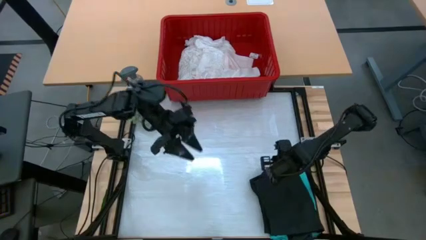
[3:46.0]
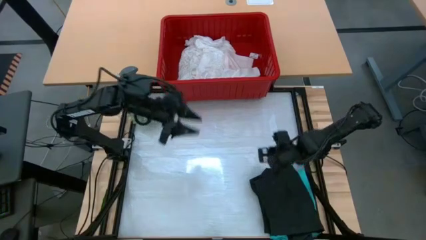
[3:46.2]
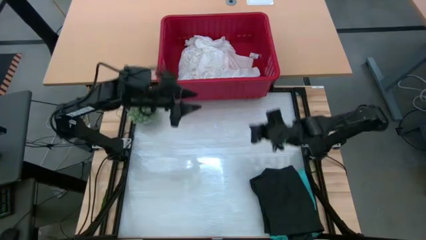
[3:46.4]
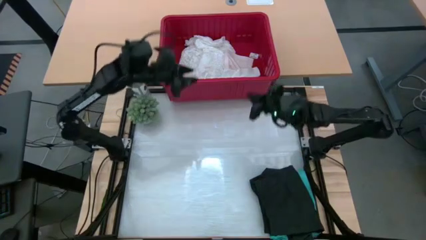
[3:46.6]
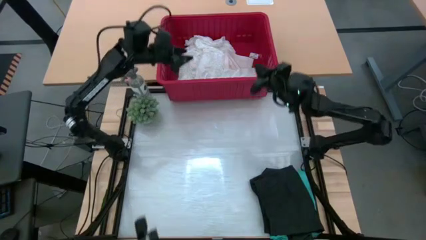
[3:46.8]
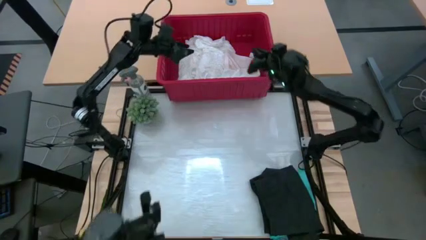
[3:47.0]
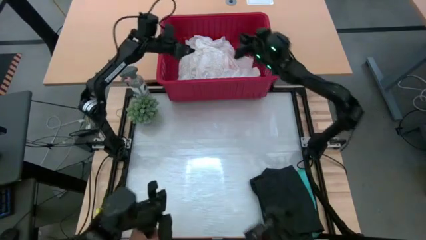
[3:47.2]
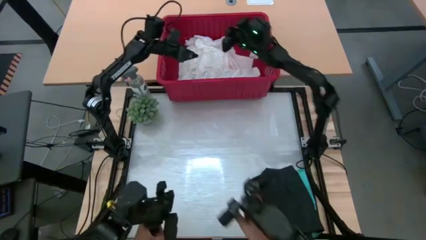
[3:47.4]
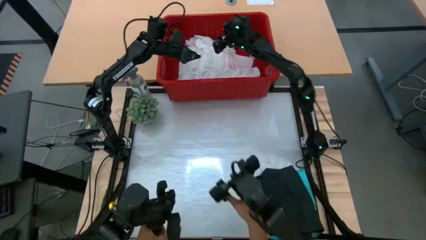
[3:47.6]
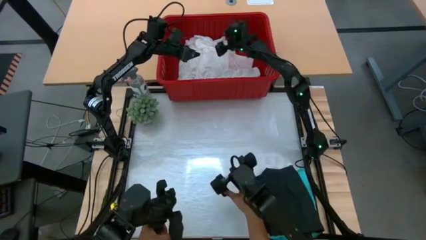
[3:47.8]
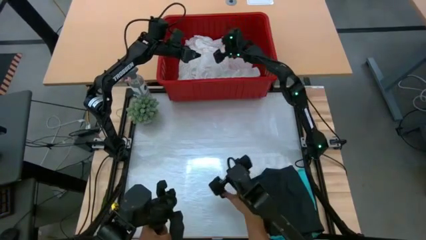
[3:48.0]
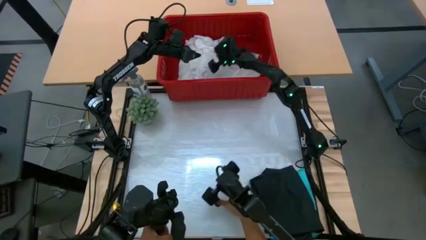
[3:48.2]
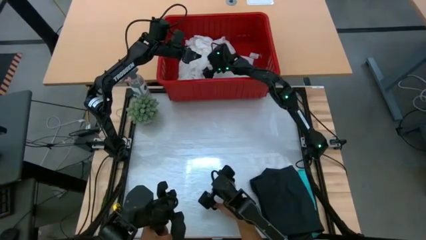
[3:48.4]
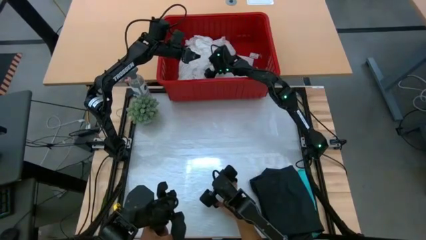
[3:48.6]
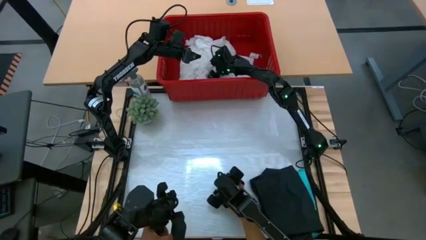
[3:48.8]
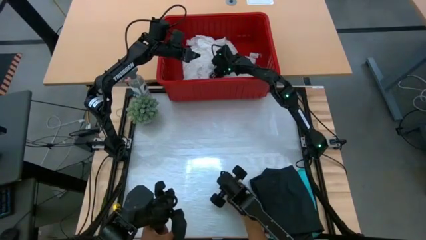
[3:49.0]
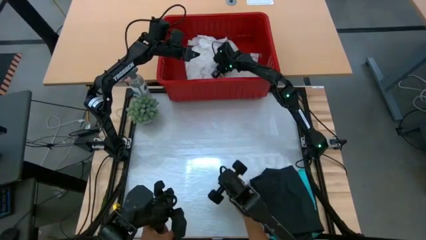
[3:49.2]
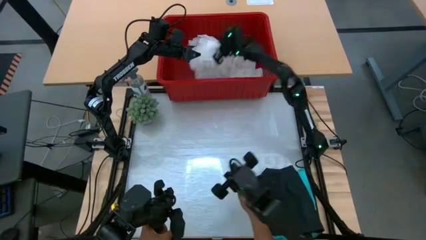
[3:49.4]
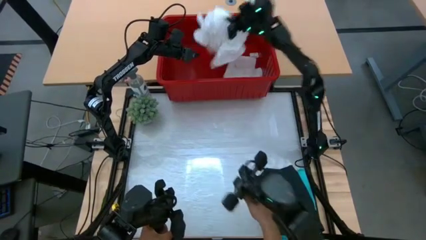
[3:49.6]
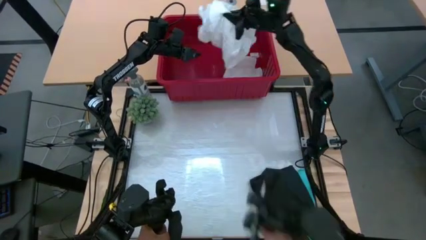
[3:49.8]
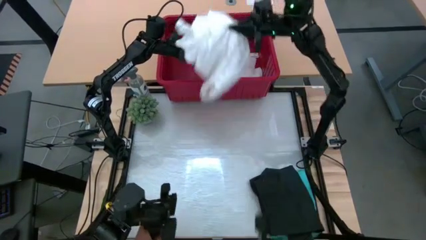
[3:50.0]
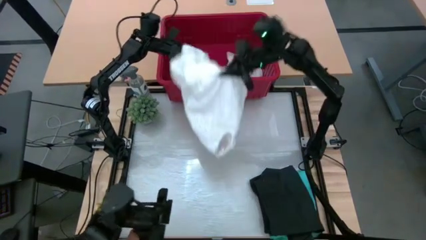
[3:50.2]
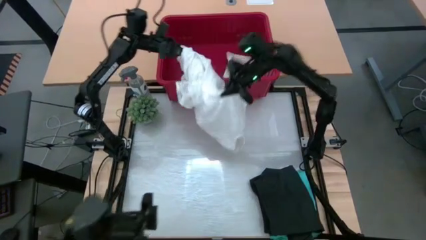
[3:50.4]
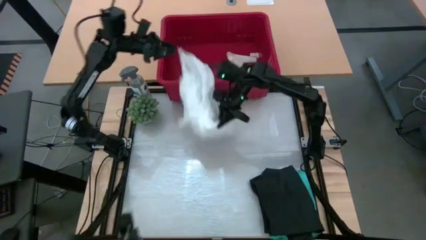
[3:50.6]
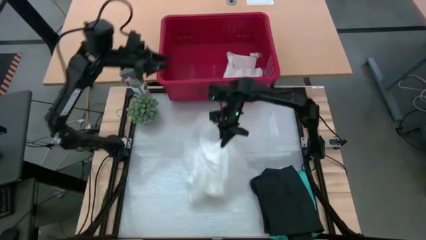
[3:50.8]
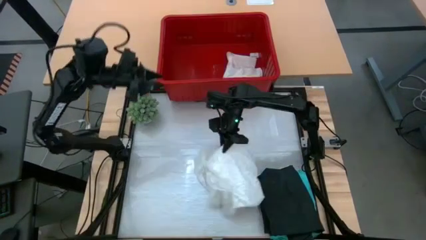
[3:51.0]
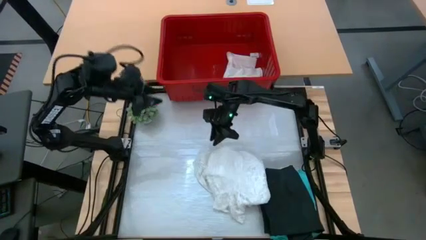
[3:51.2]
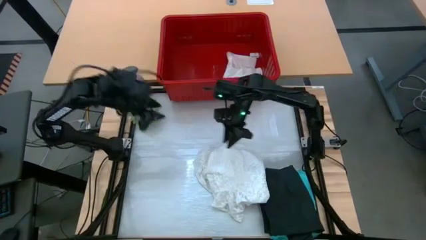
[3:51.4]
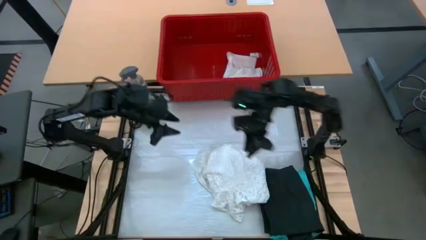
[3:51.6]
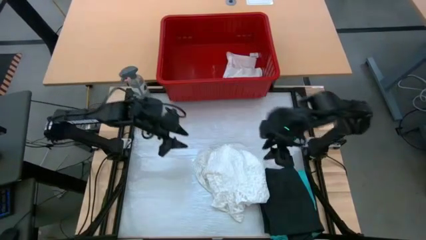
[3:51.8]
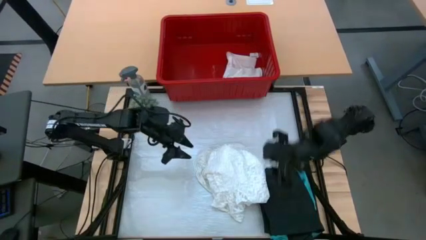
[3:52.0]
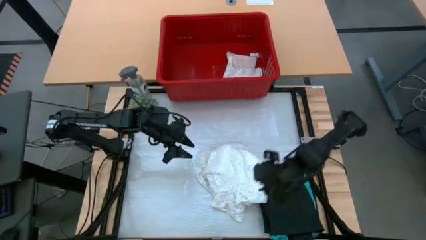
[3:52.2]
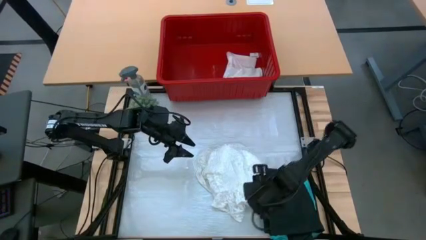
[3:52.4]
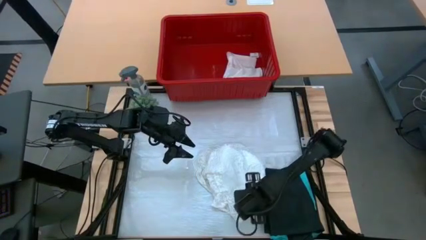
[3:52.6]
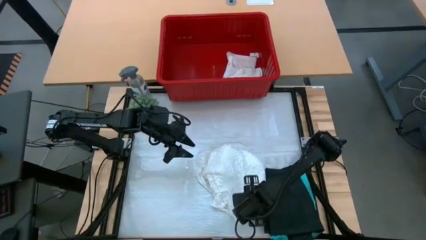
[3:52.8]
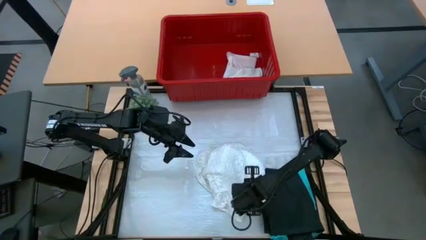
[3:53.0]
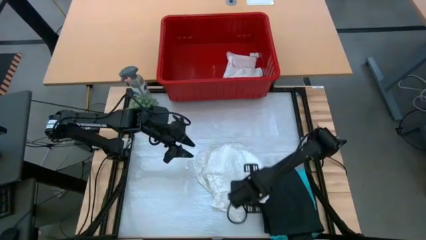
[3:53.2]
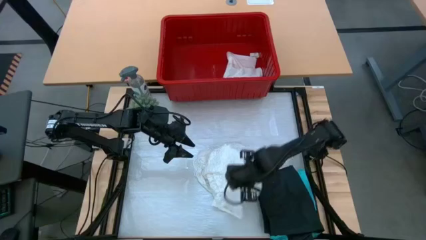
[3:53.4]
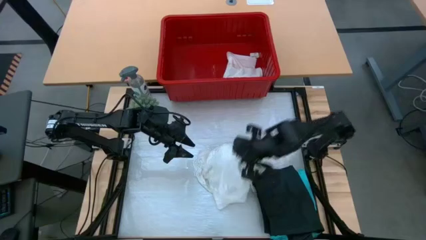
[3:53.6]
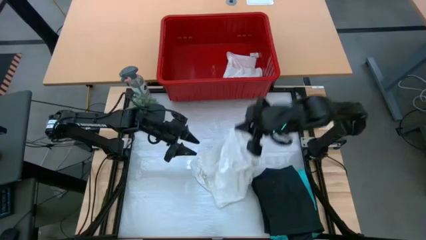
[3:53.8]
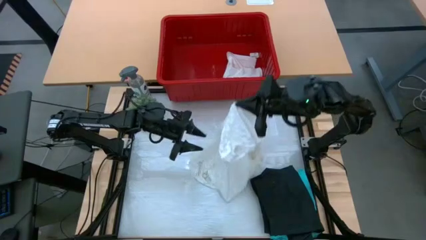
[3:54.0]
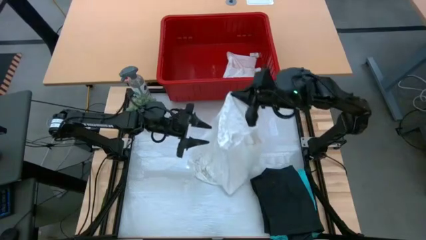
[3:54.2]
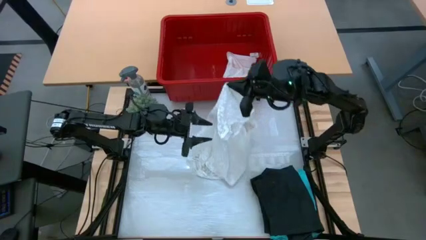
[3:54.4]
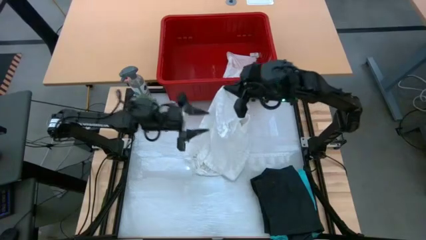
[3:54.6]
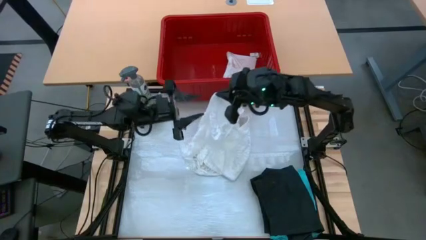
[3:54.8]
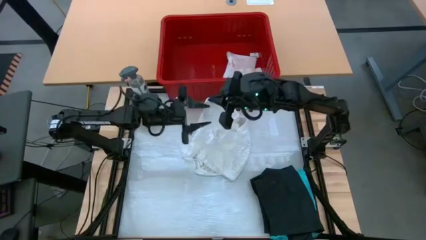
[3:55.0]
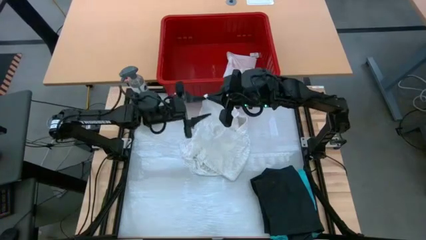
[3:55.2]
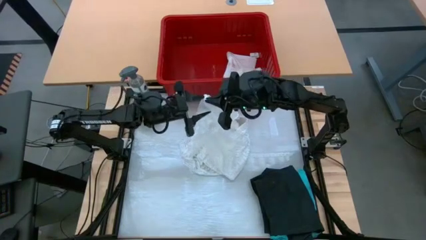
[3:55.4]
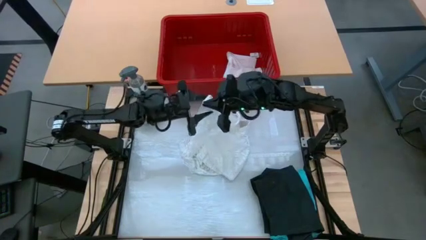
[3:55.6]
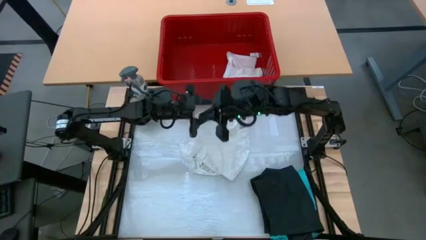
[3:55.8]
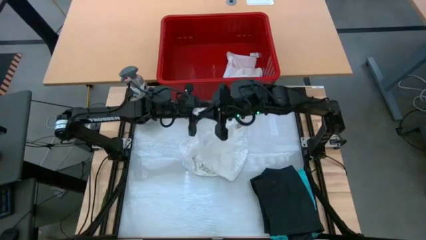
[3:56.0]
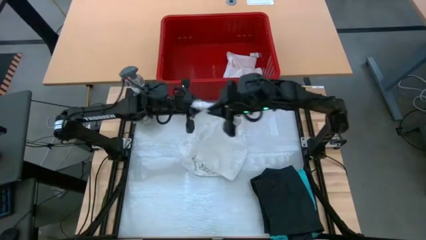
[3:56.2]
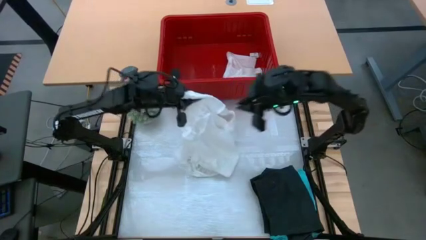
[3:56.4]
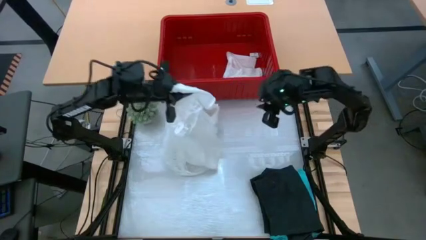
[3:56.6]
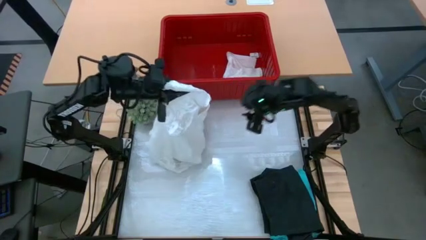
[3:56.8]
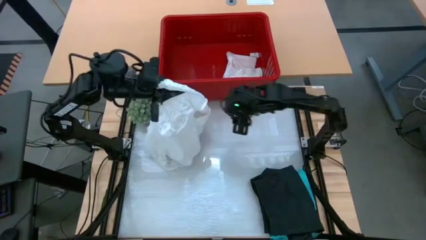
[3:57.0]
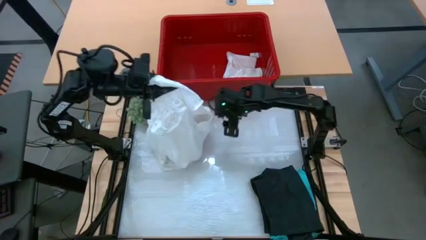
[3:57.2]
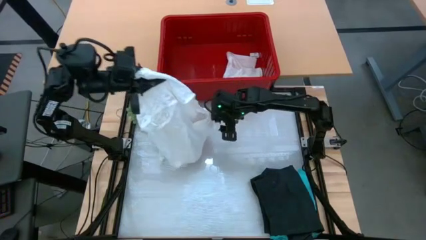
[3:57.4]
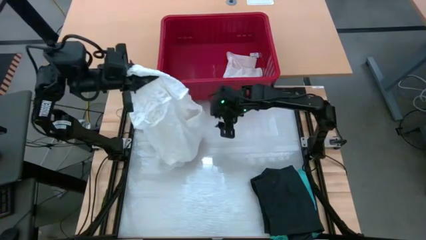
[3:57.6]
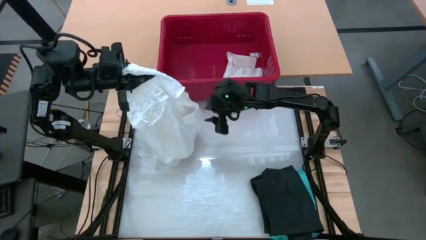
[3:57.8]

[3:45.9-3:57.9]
Task: Fold Laundry from Bin
Fold the white t-shirt

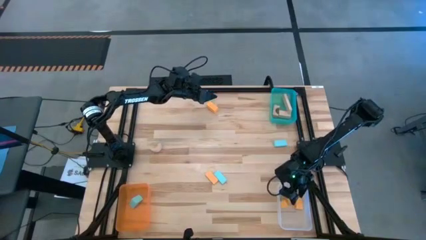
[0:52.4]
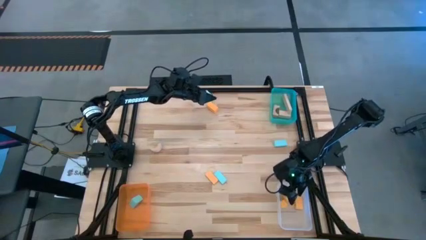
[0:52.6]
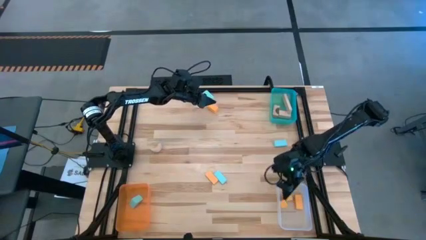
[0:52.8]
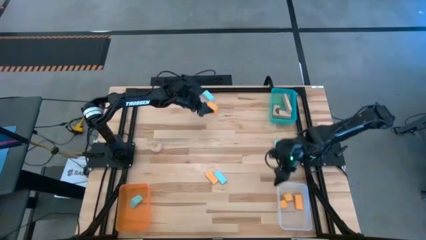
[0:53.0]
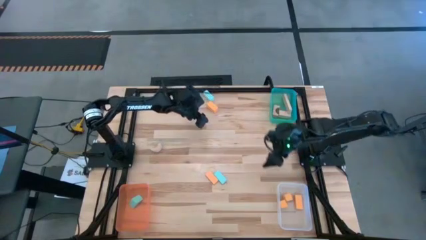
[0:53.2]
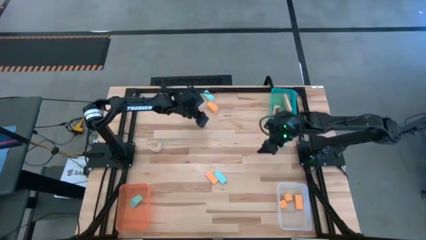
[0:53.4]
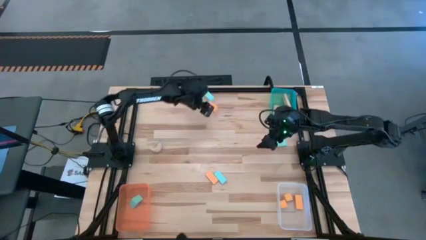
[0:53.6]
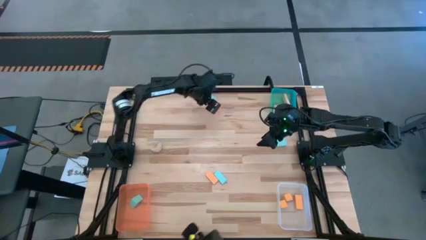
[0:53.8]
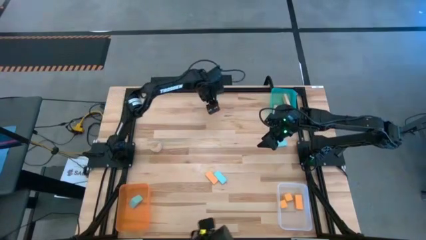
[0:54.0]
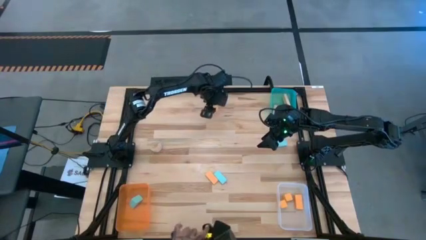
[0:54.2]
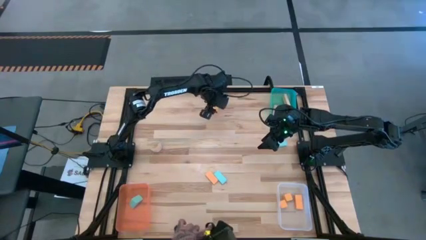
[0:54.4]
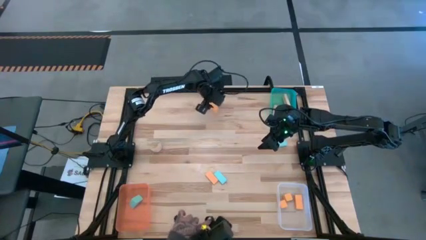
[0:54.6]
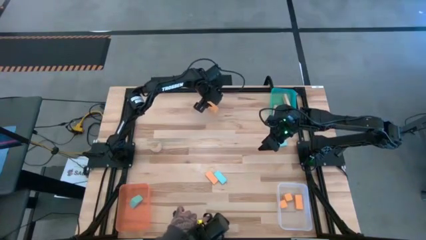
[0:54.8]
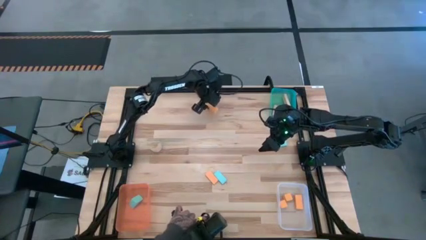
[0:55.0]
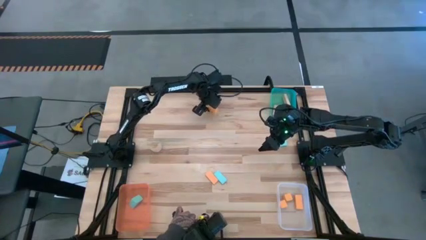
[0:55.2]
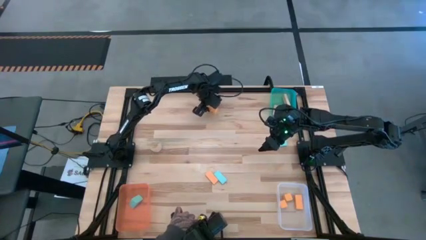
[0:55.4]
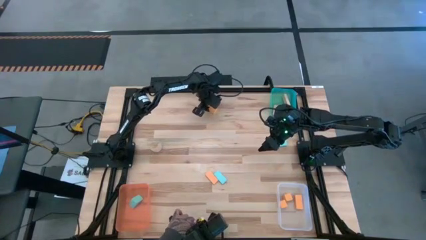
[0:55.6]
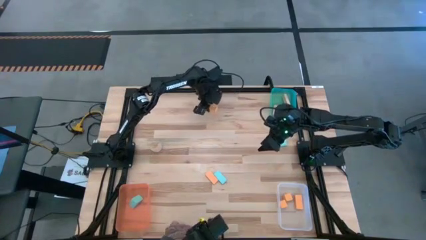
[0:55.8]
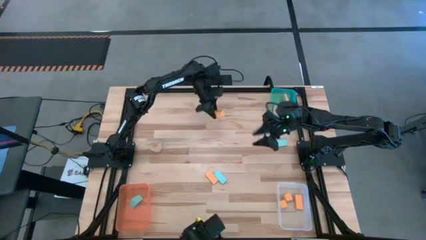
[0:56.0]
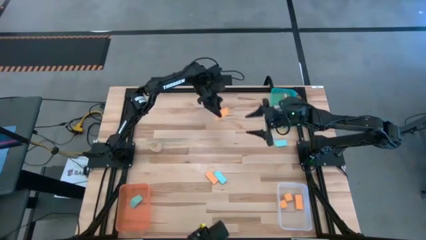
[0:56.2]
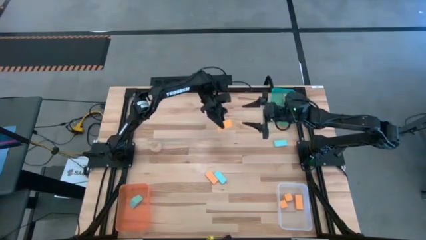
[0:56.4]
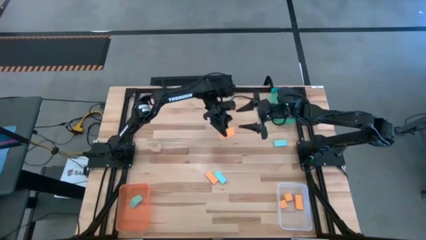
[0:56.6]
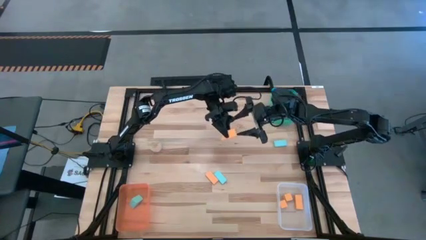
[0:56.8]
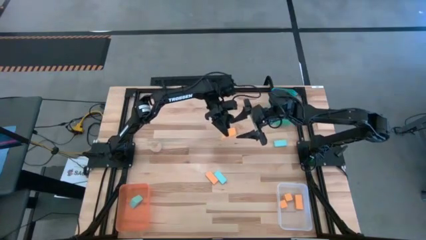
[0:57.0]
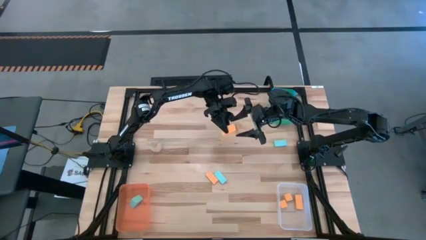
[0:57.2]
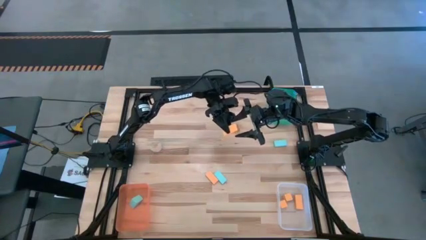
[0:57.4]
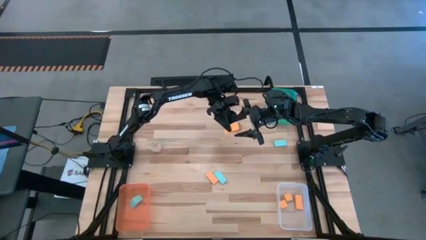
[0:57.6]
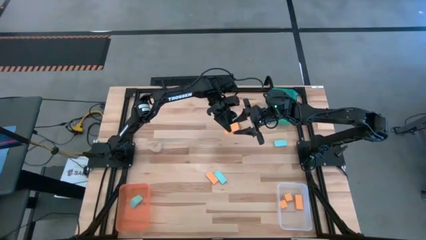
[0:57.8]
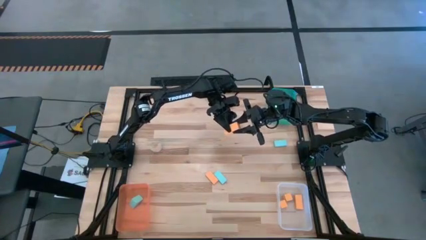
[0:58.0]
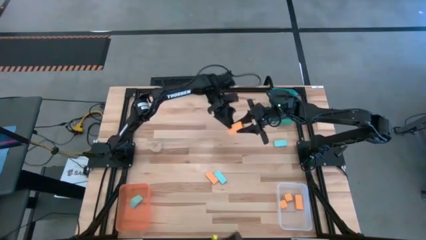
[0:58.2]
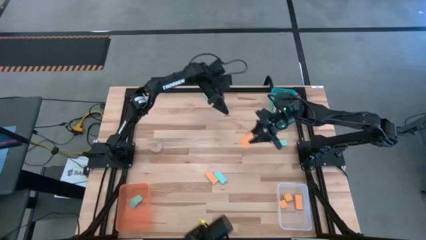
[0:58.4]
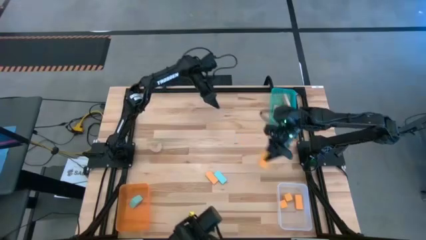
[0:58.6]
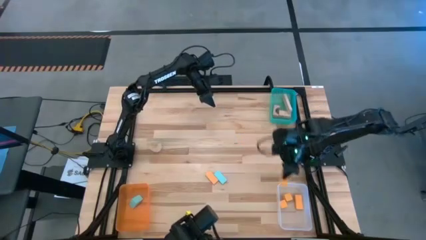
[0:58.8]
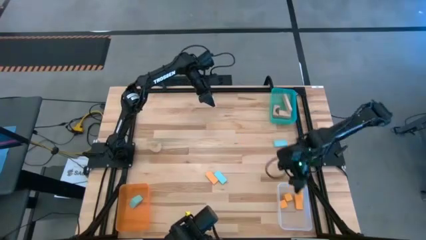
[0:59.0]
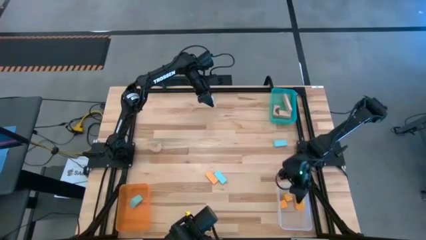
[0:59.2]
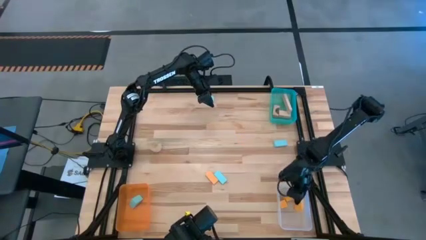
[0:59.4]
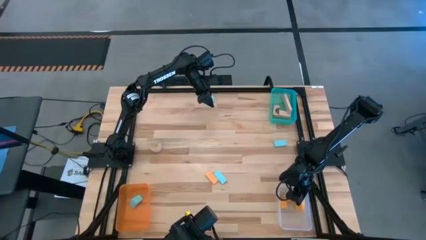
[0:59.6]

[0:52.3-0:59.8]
Task: Sort & place blocks by color
Put the yellow block into the transparent bin
